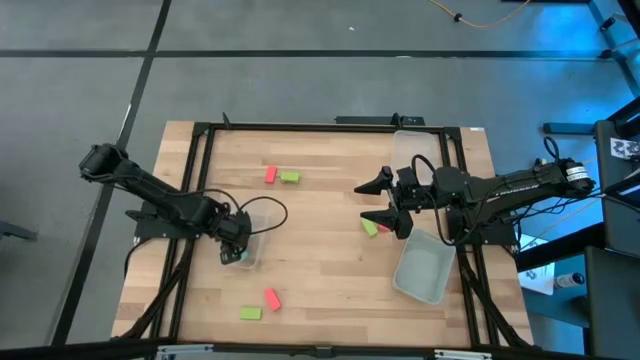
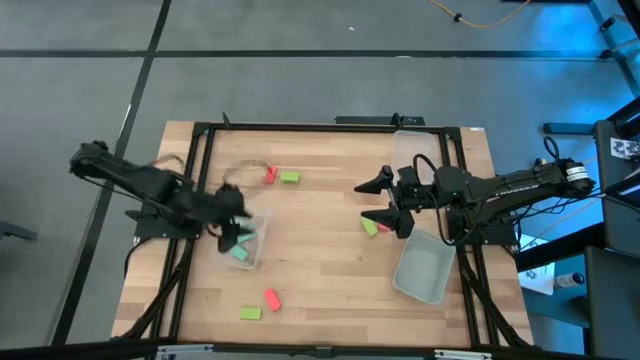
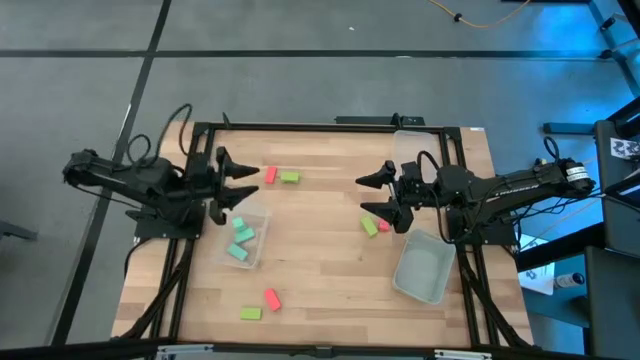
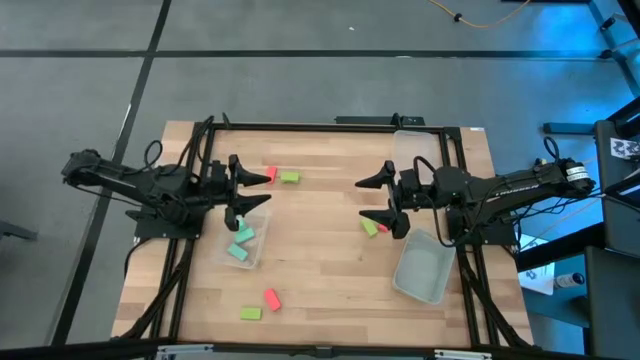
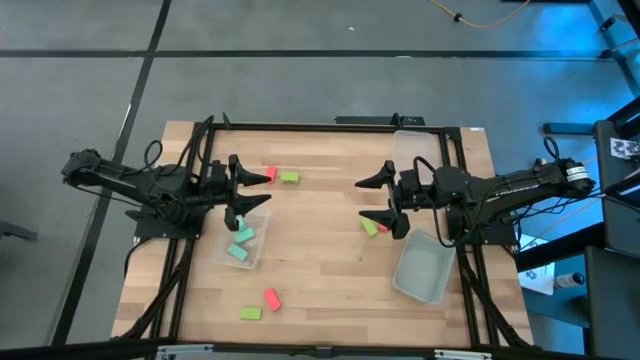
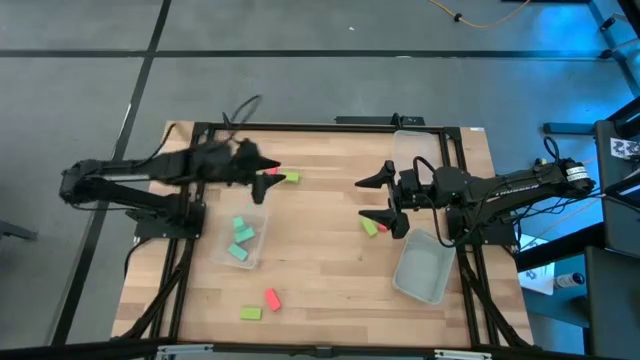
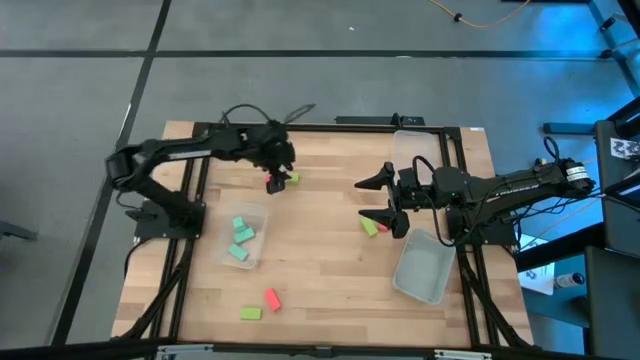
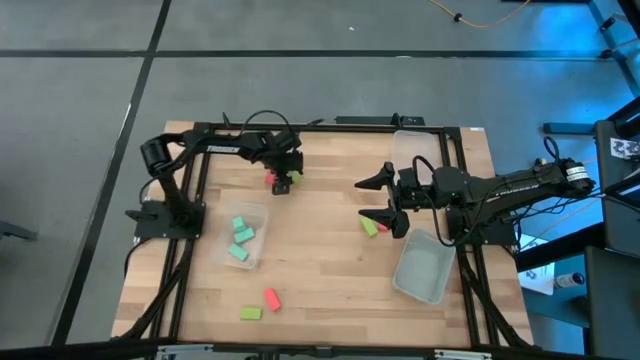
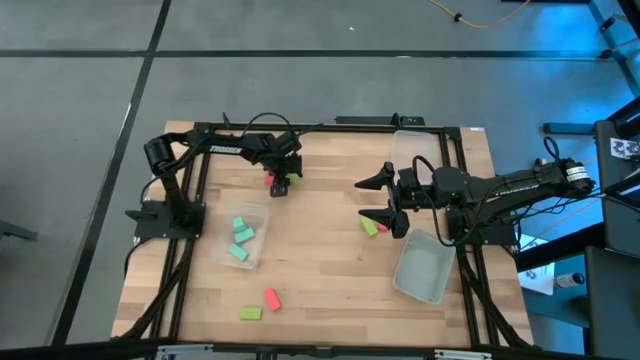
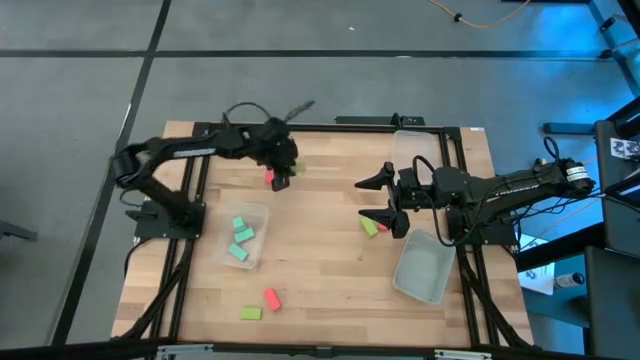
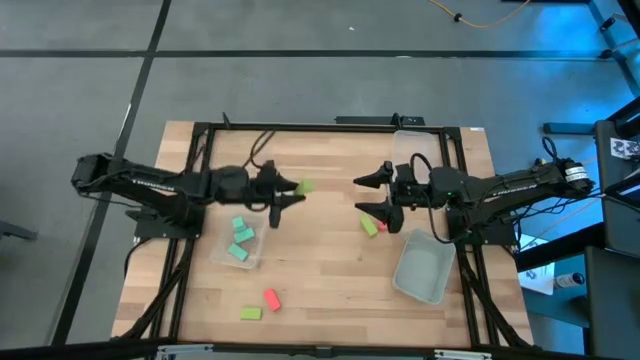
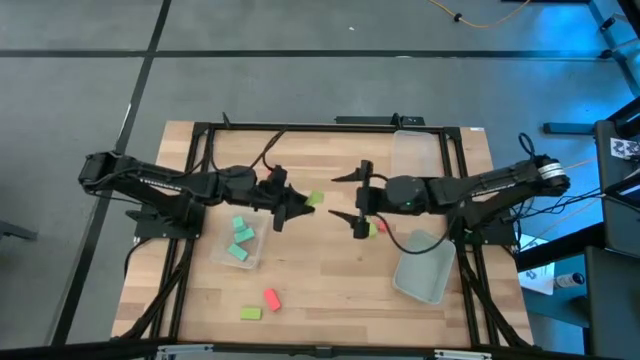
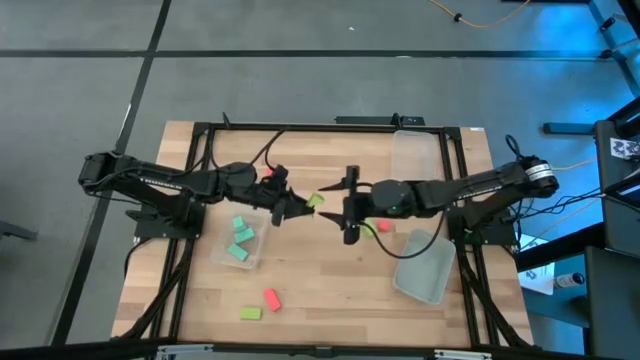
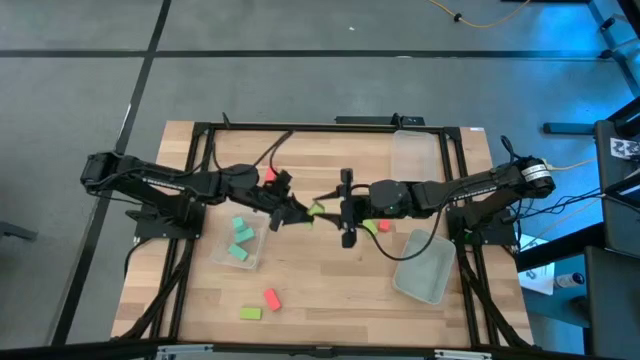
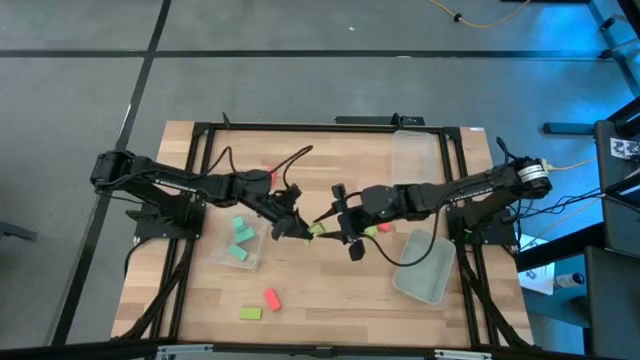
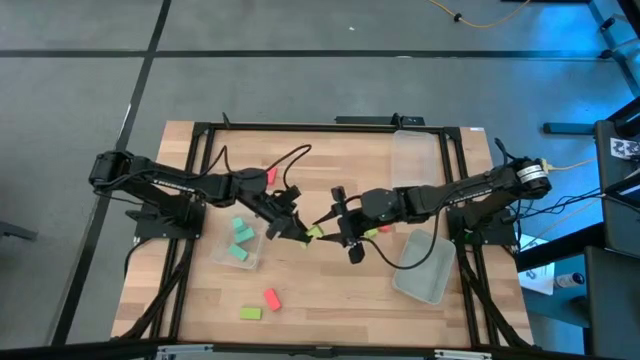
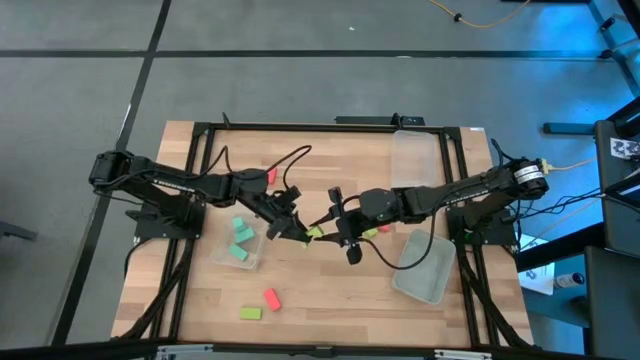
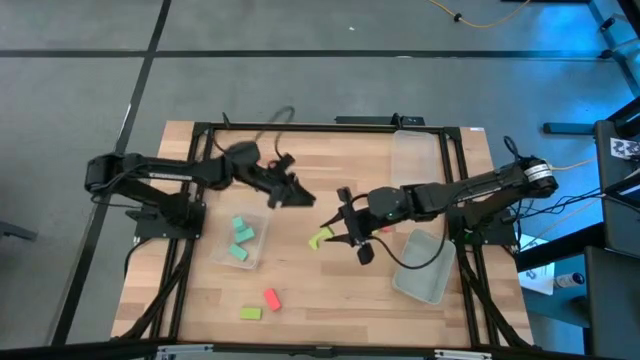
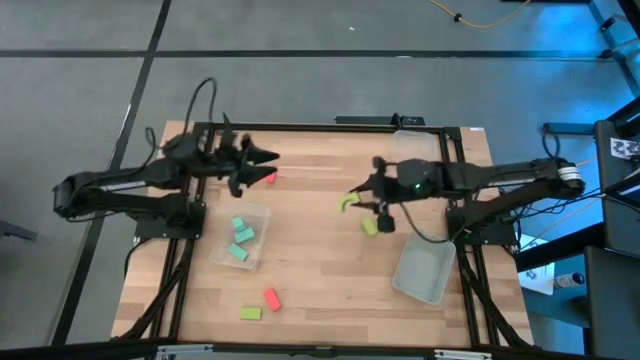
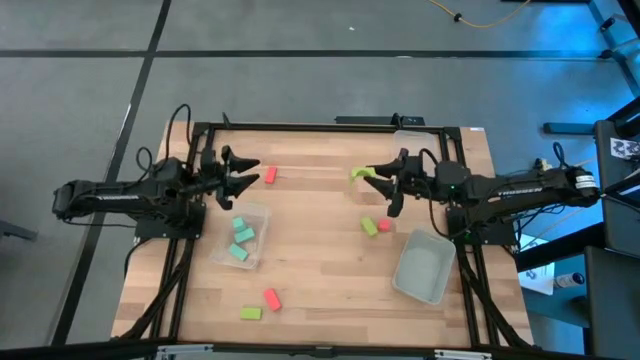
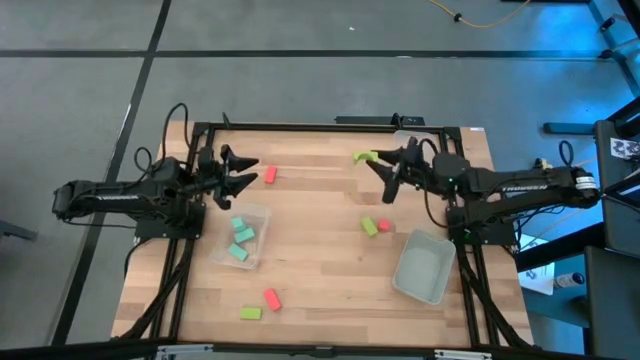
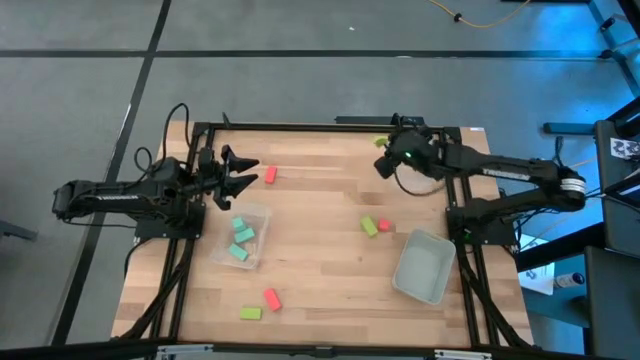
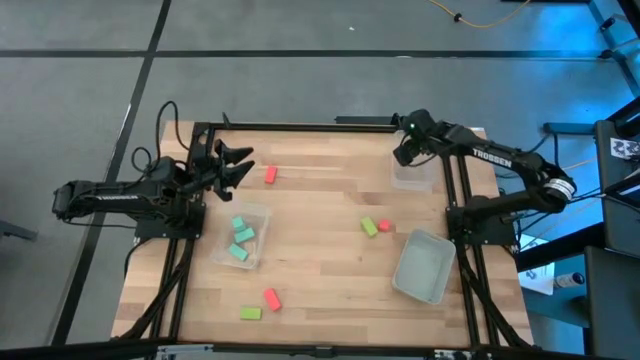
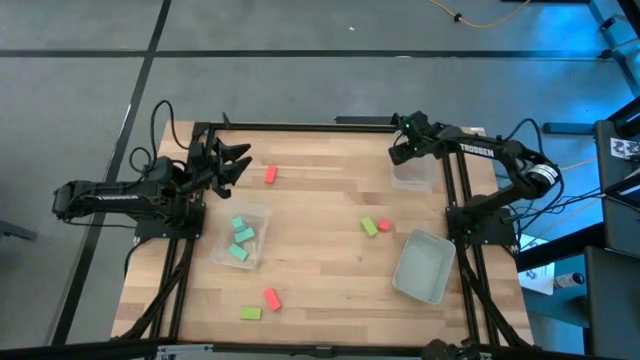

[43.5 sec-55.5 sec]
Task: Sort & place blocks by color
Put the top left green block into the right transparent bin

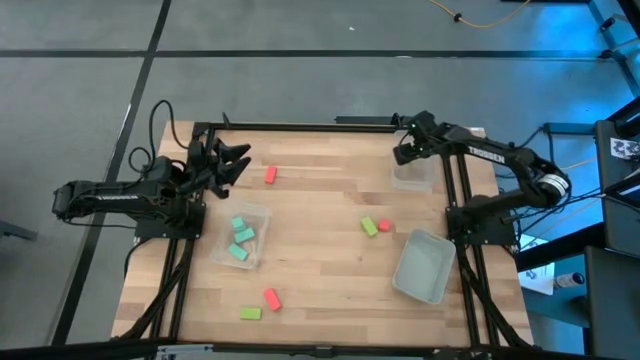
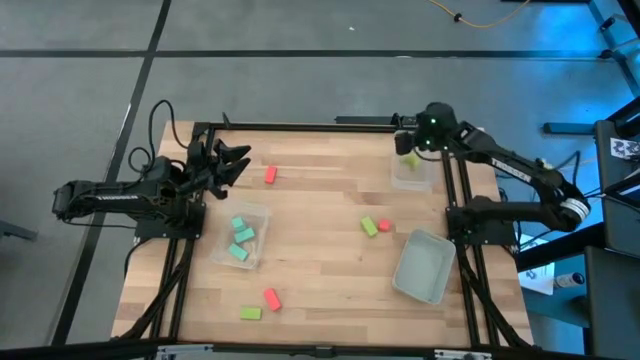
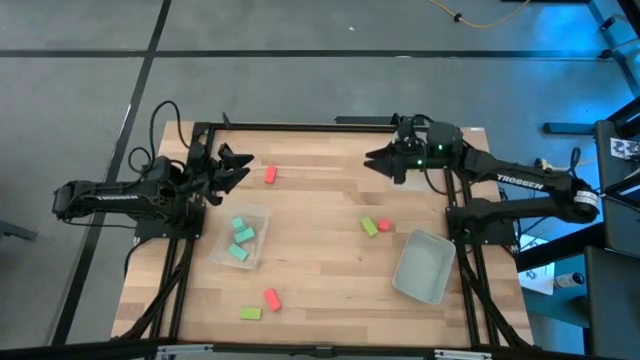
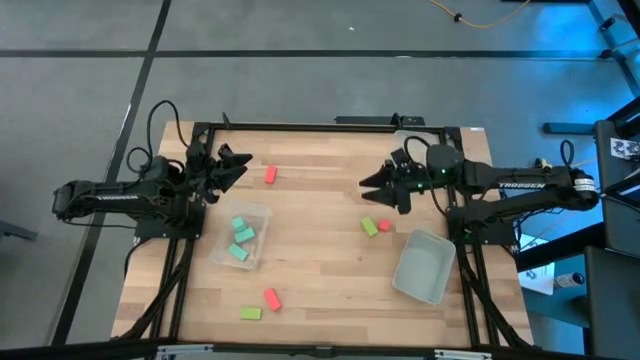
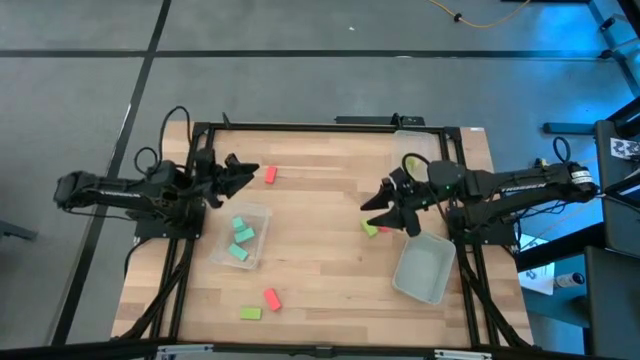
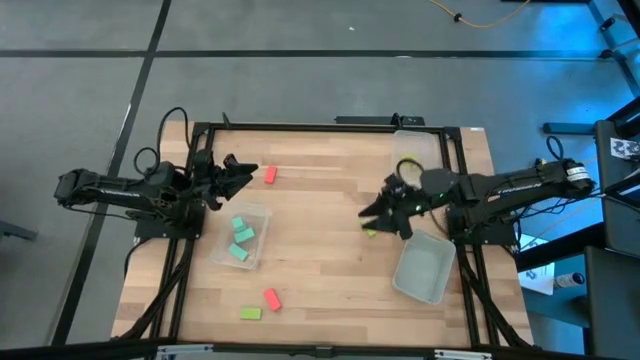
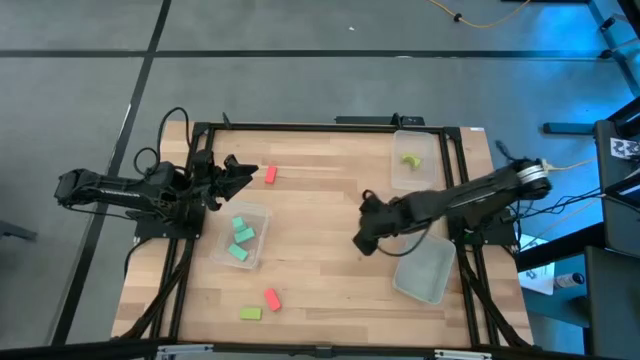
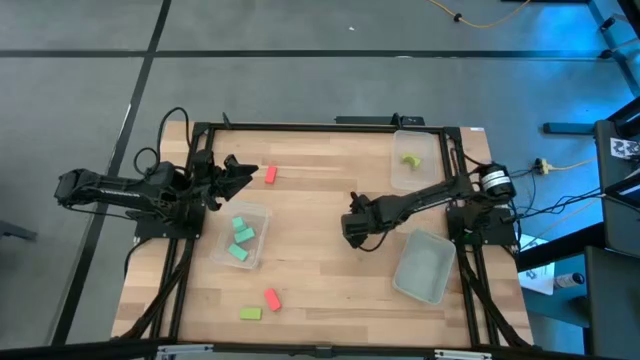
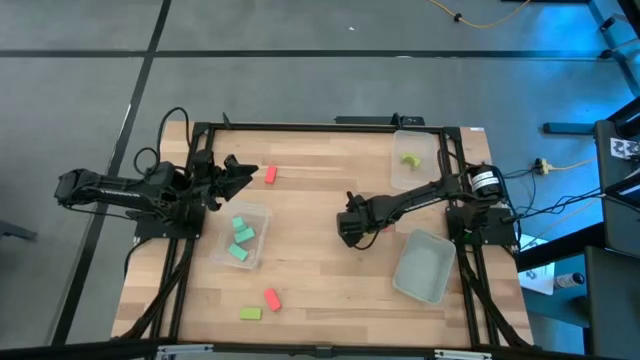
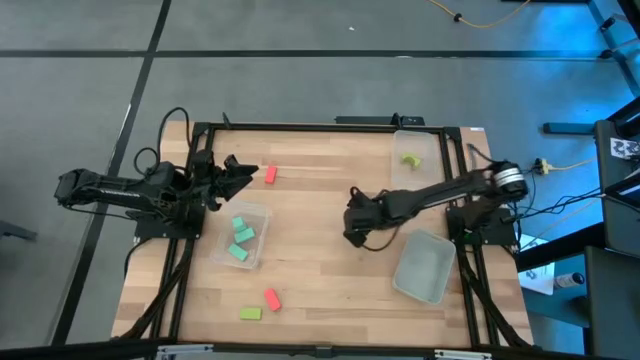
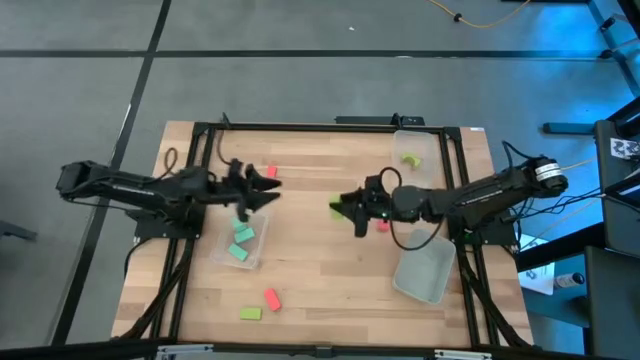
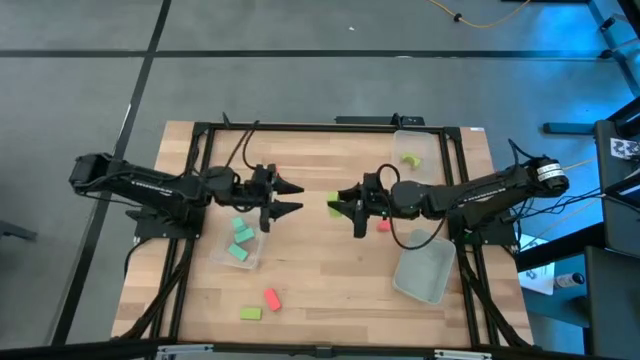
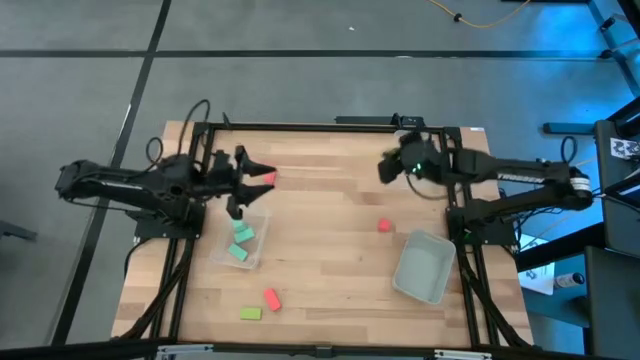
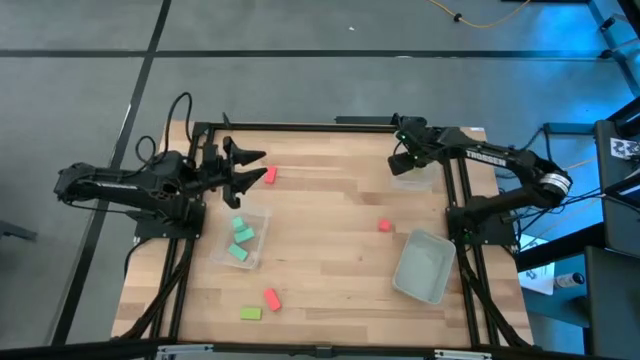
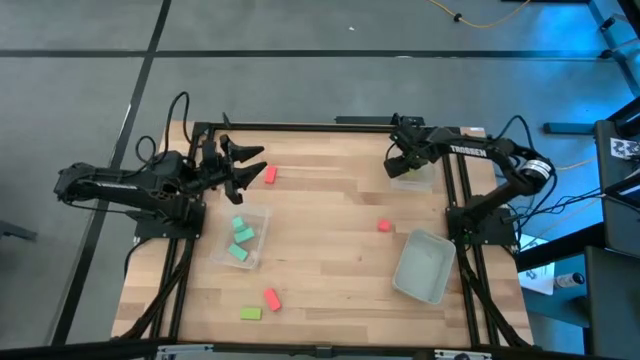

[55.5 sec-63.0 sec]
Put the top green block into the right transparent bin

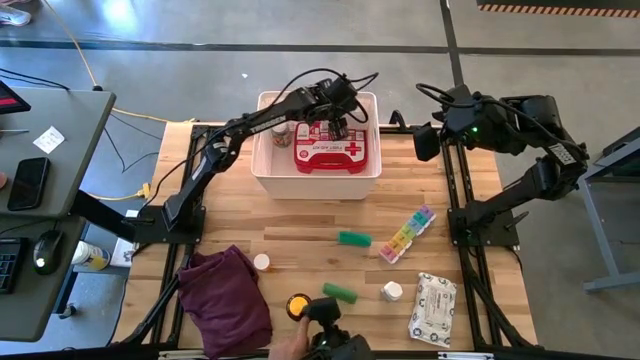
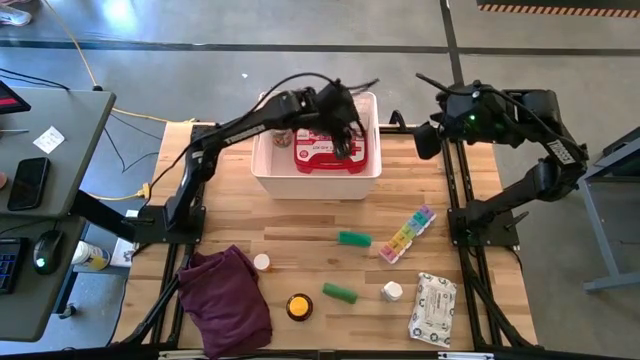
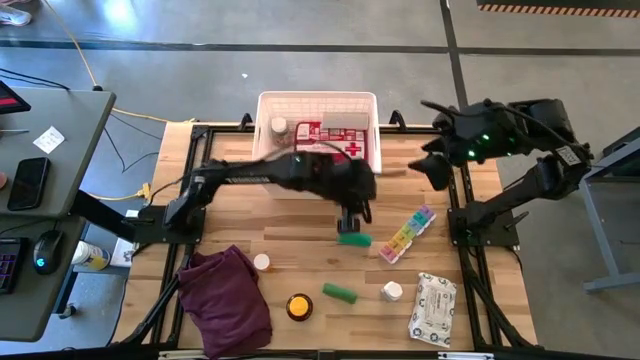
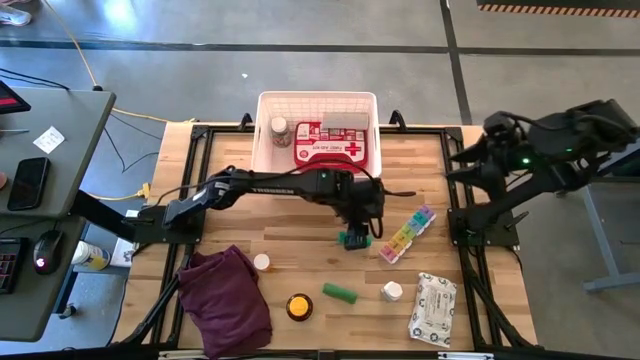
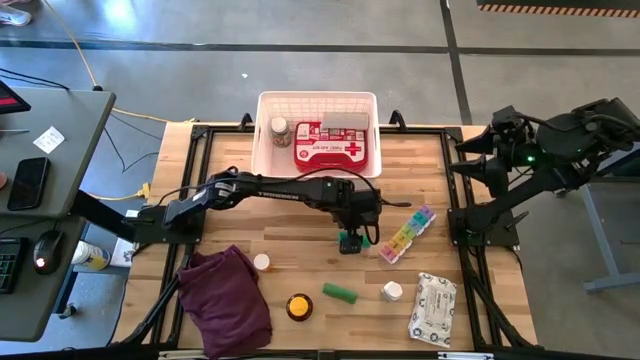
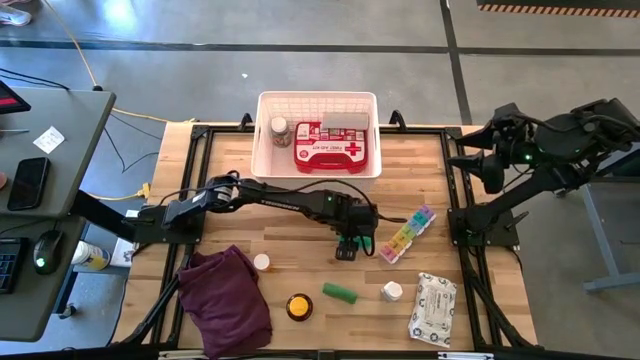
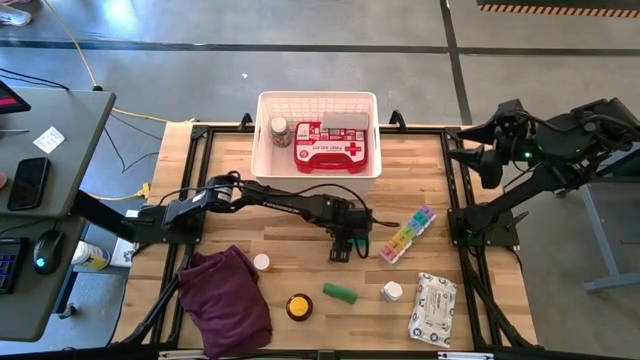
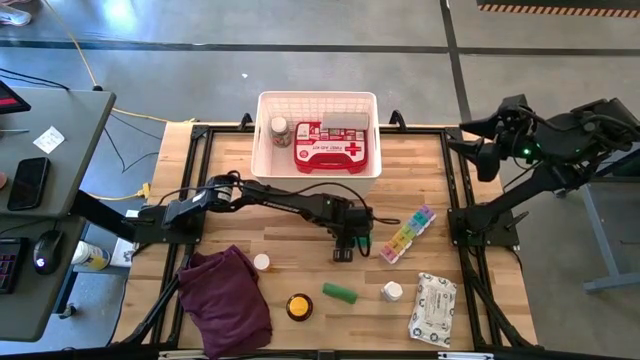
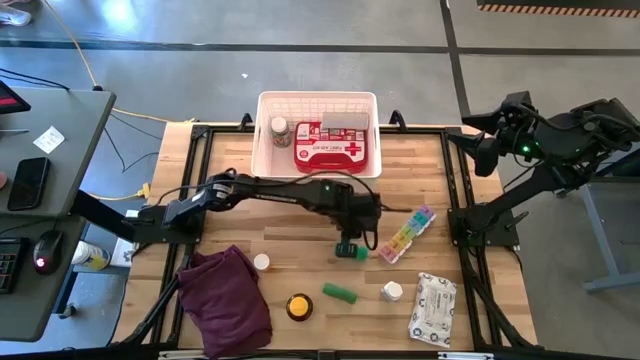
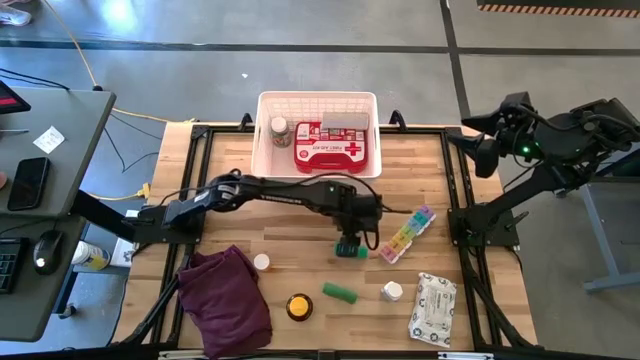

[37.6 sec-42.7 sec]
Task: Pick & place medical supplies in basket/bin
Put the blue bandage into the white bin
